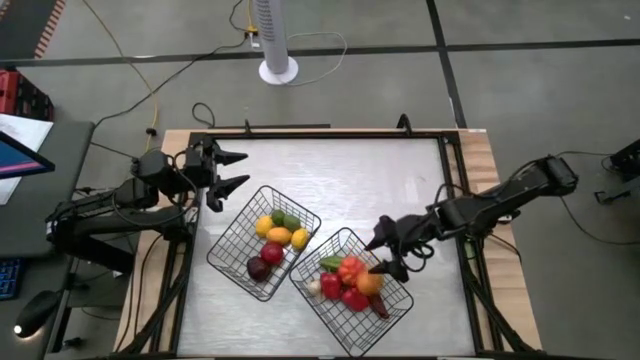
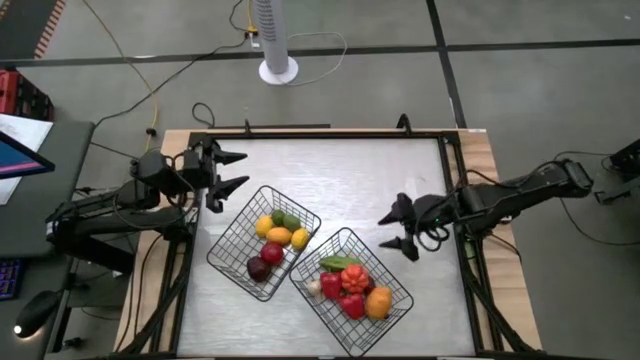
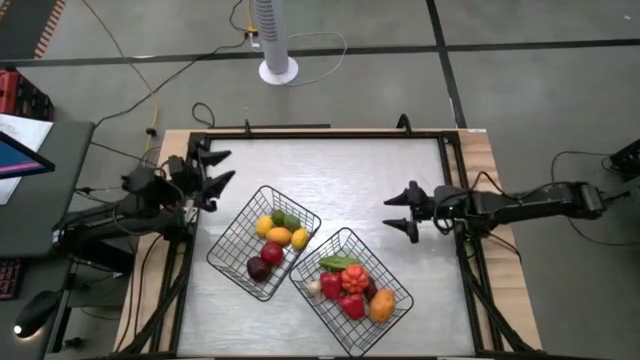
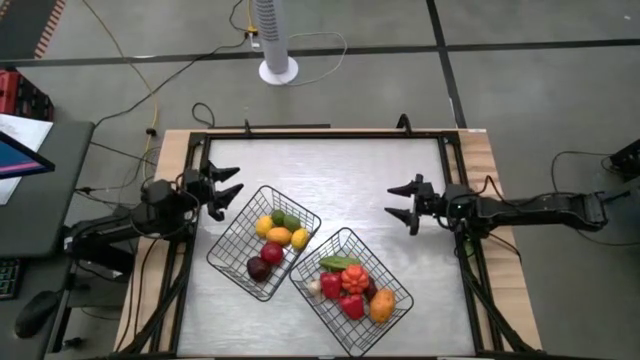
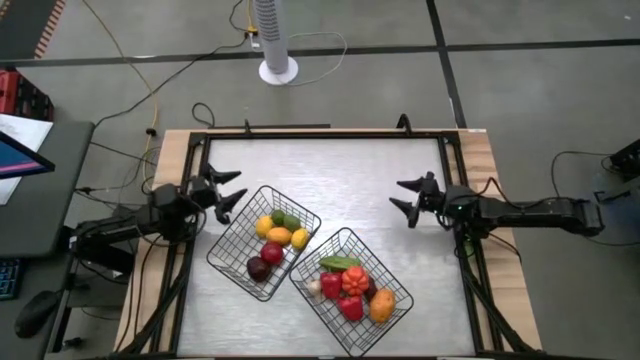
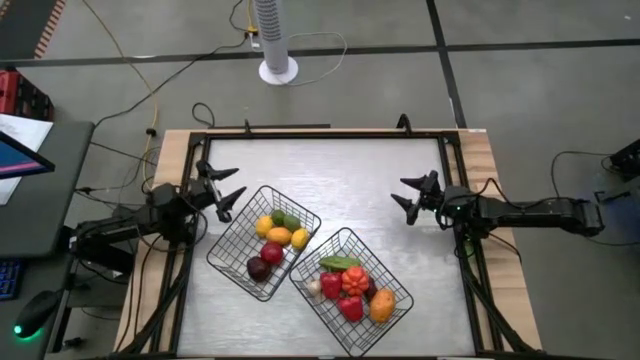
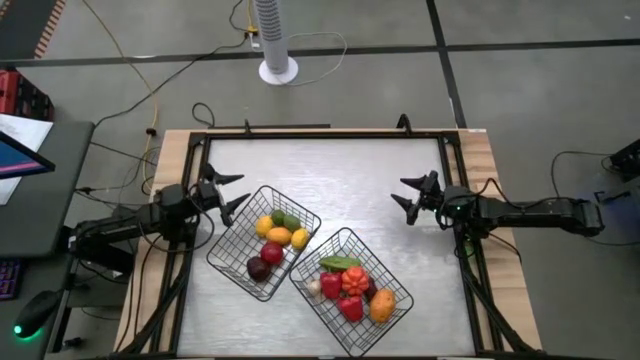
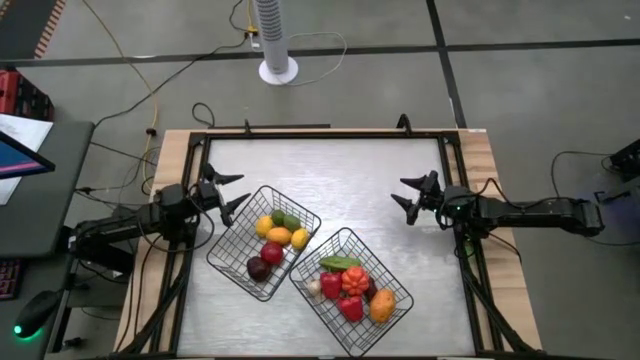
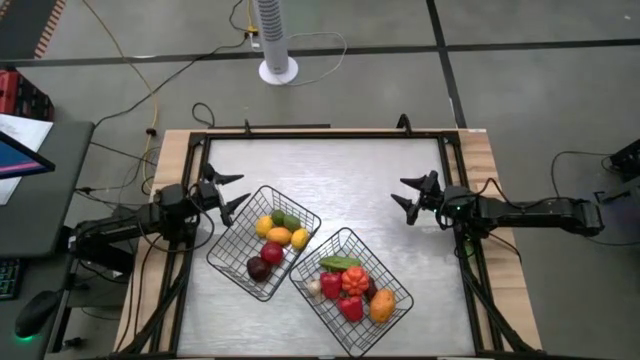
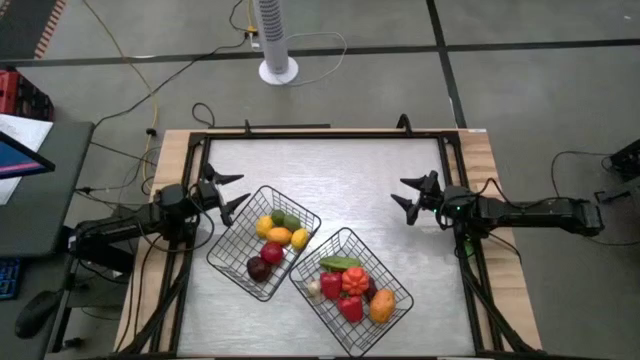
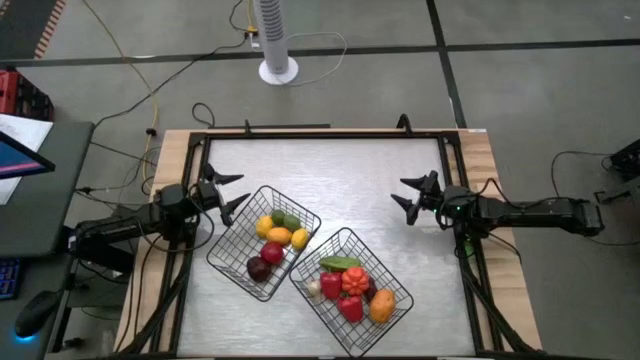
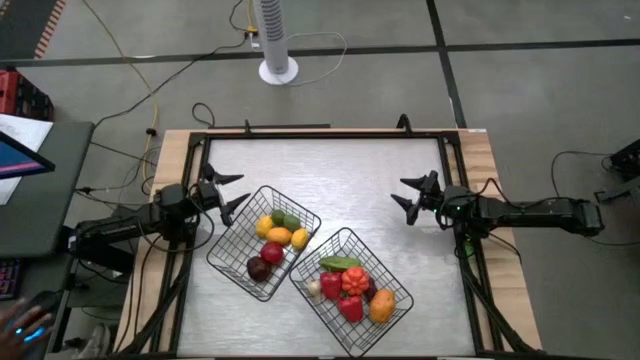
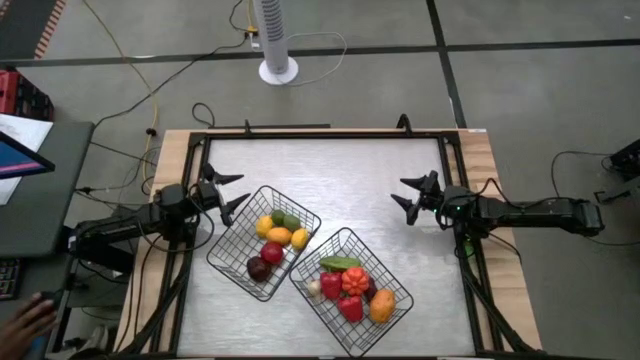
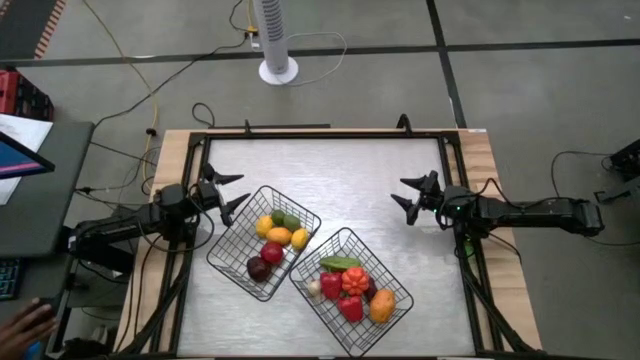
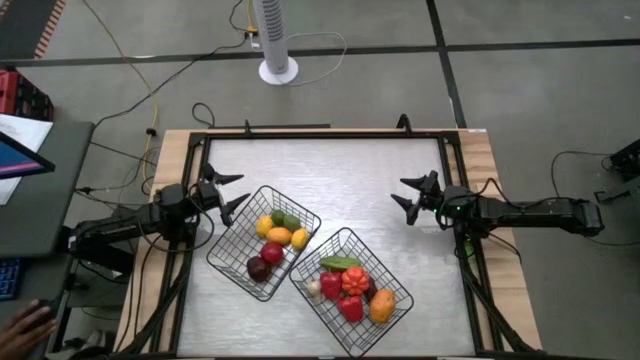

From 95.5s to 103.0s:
Task: Sort produce into baskets
Return to Home Position

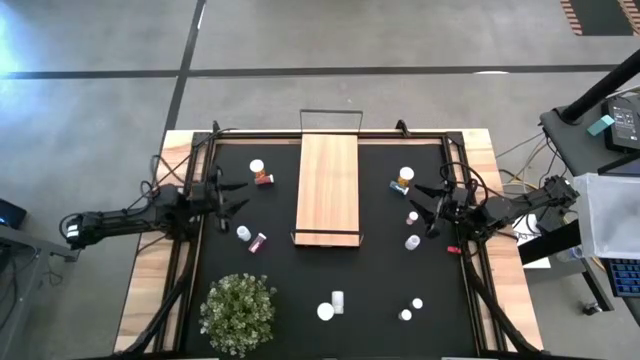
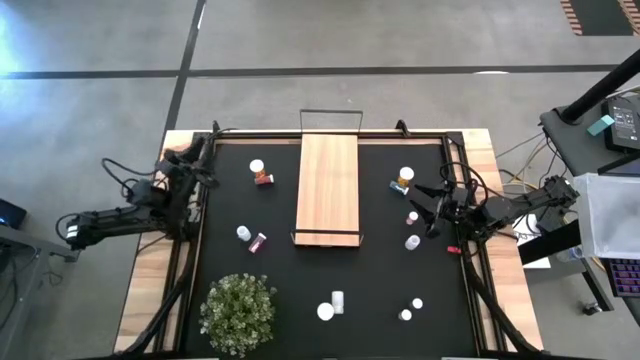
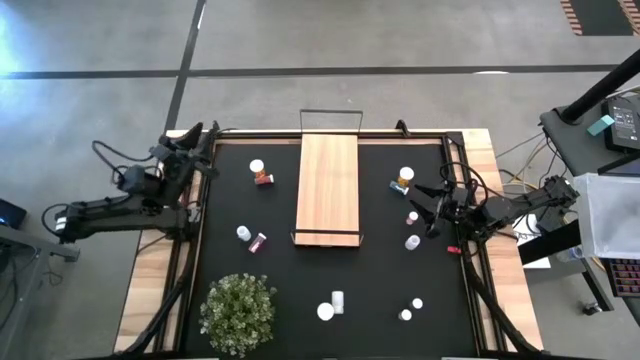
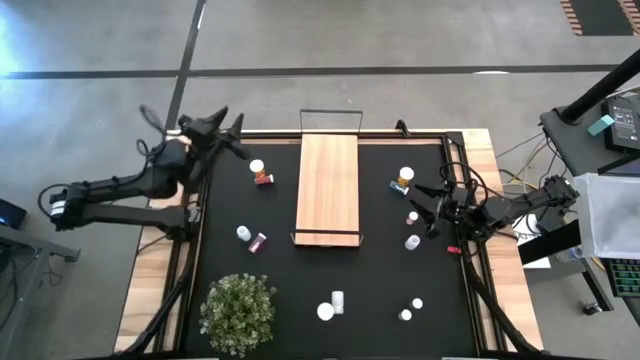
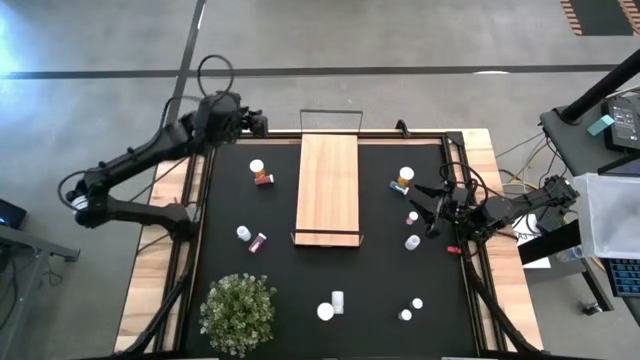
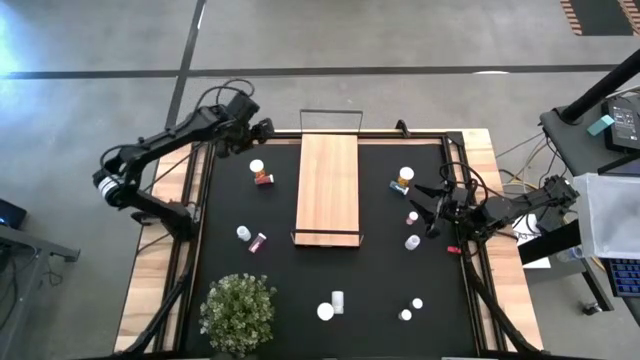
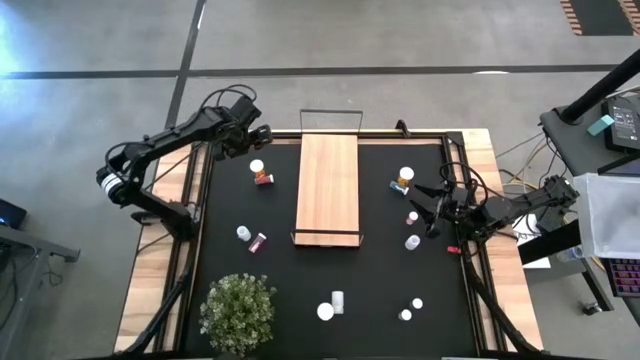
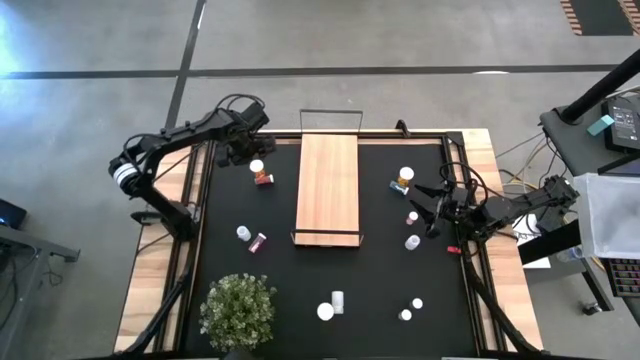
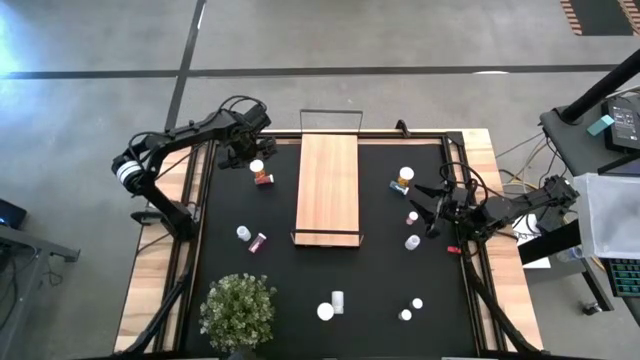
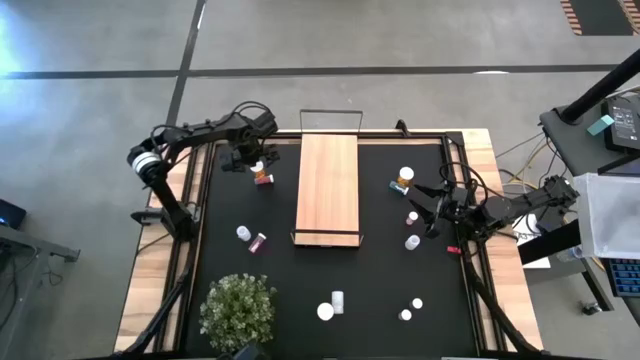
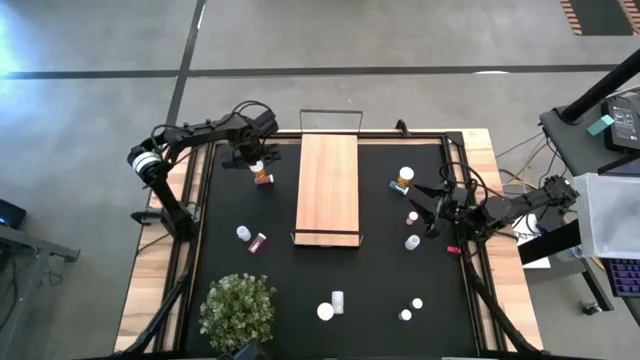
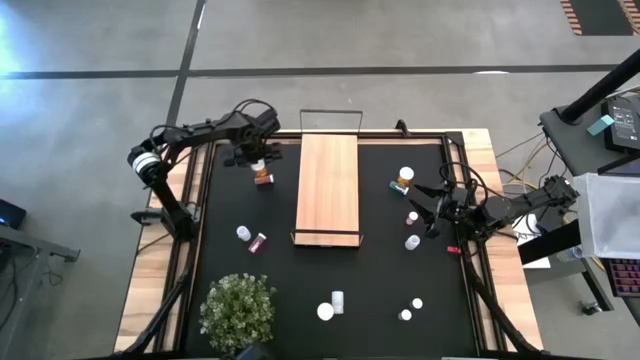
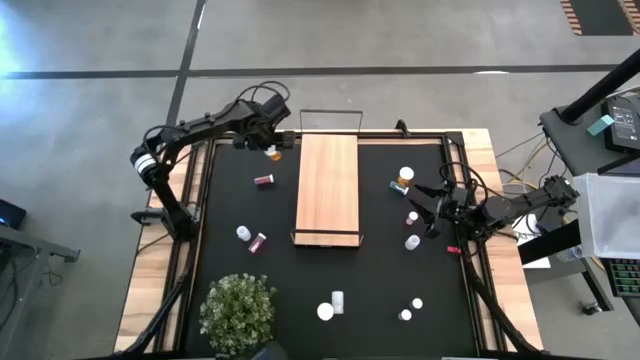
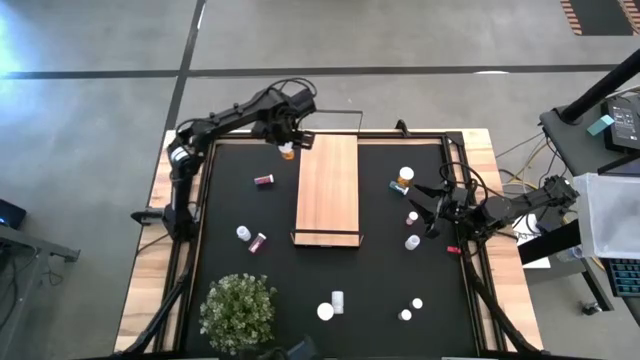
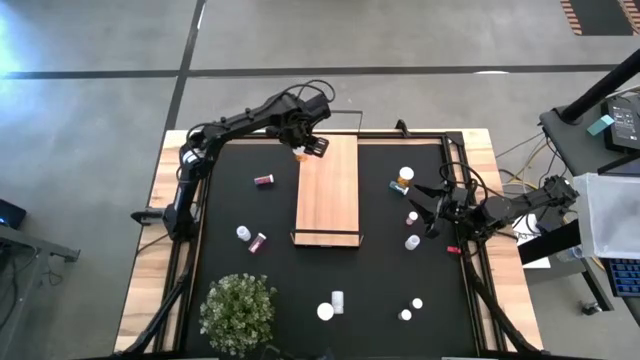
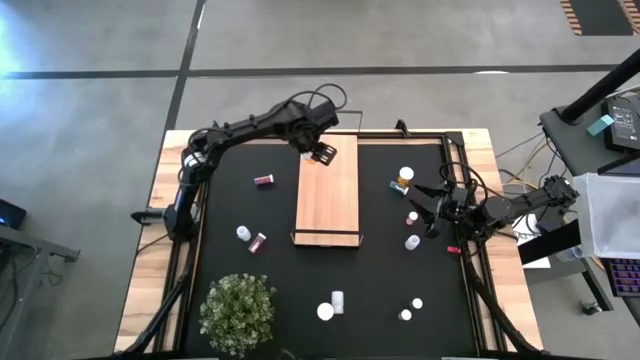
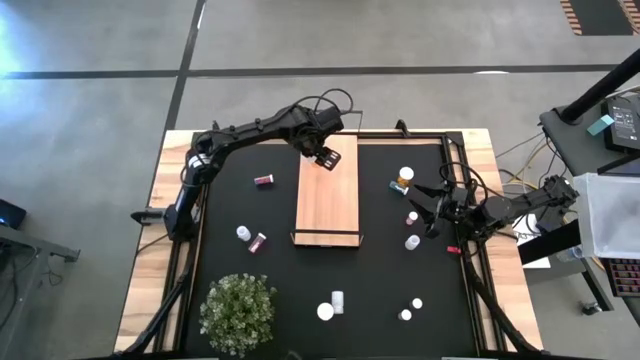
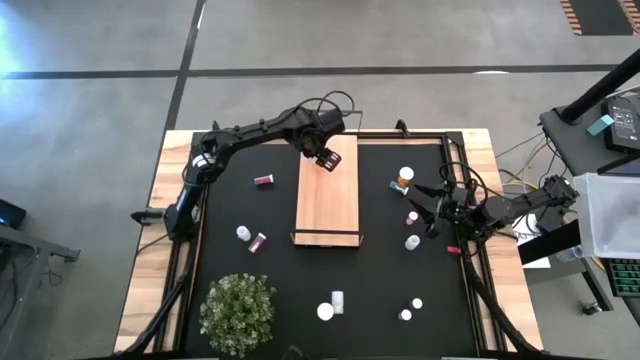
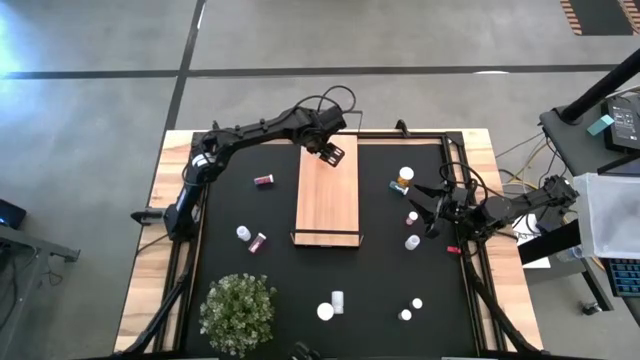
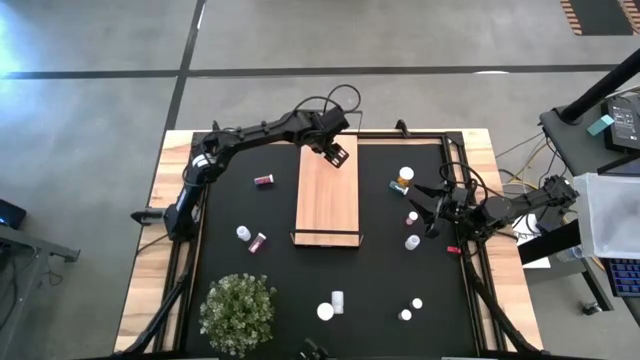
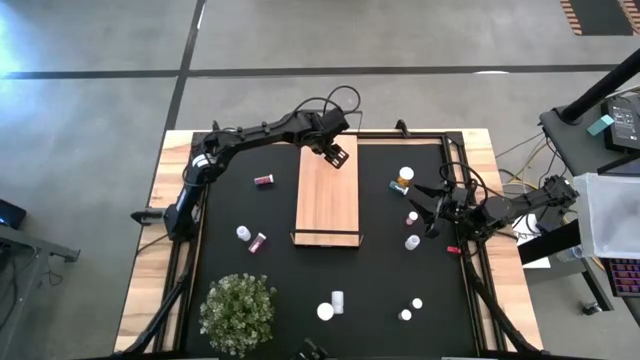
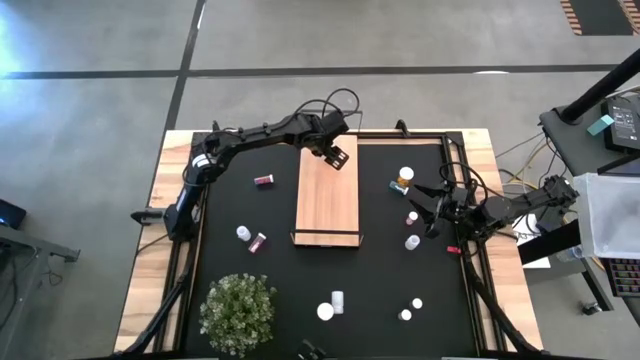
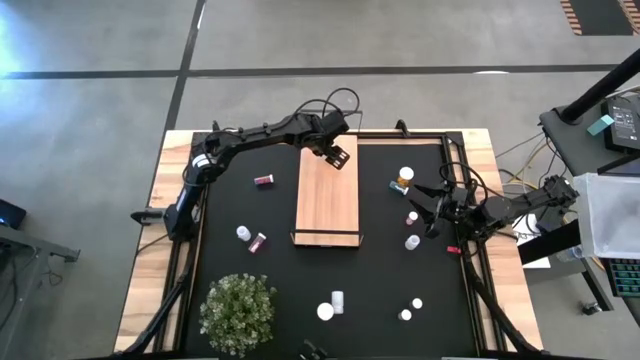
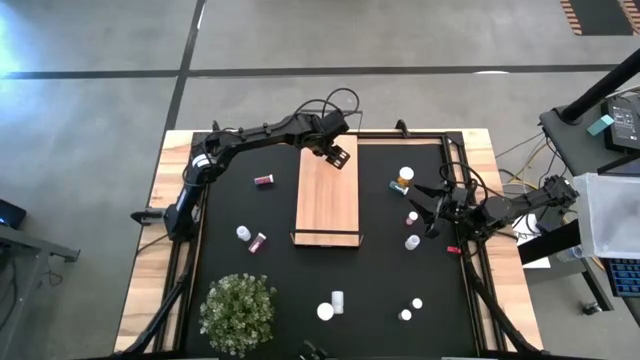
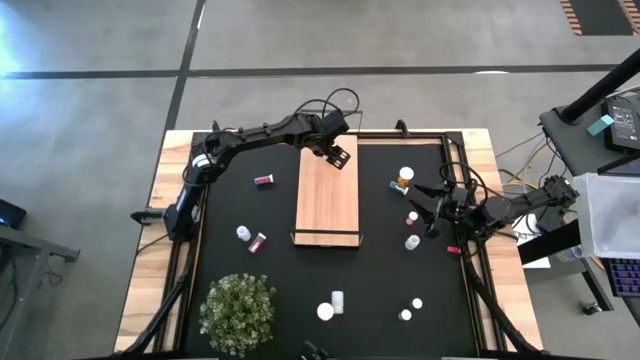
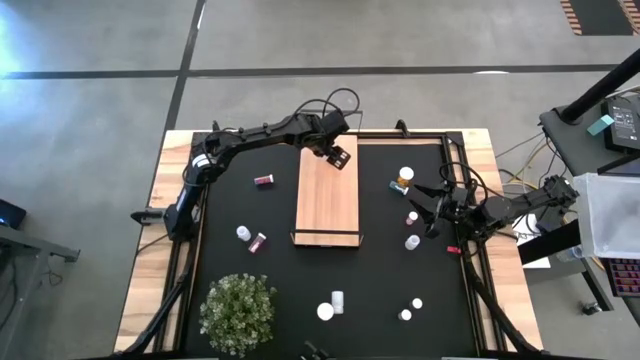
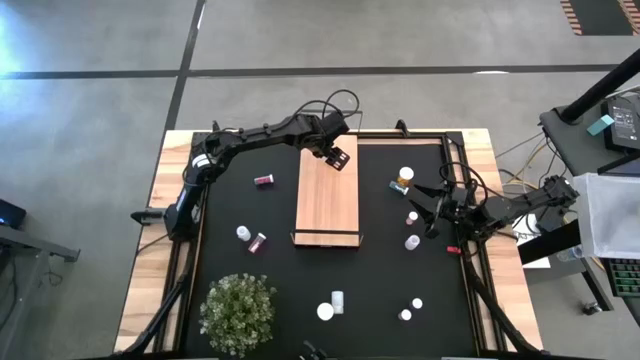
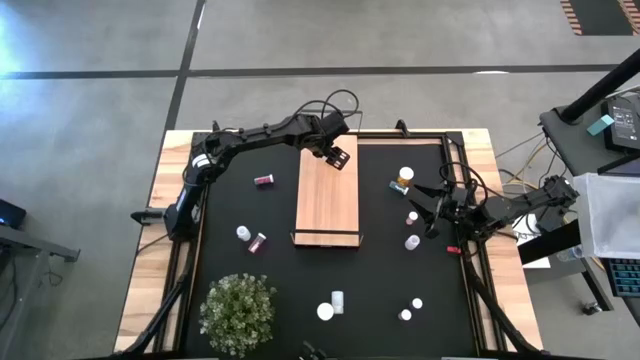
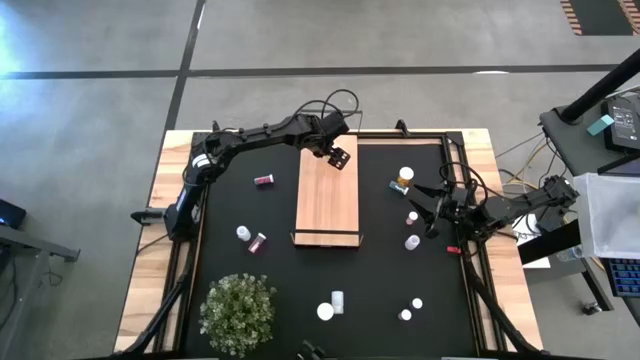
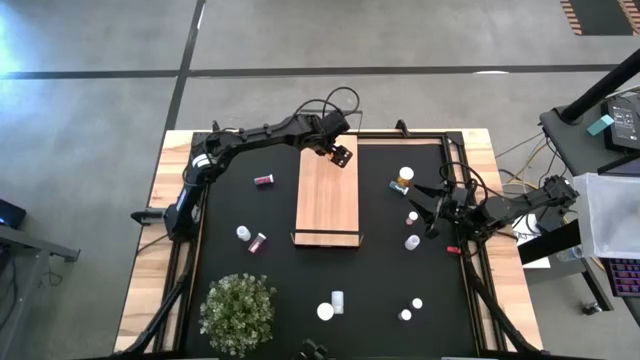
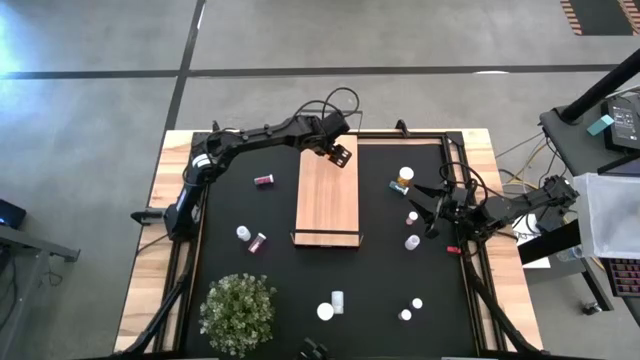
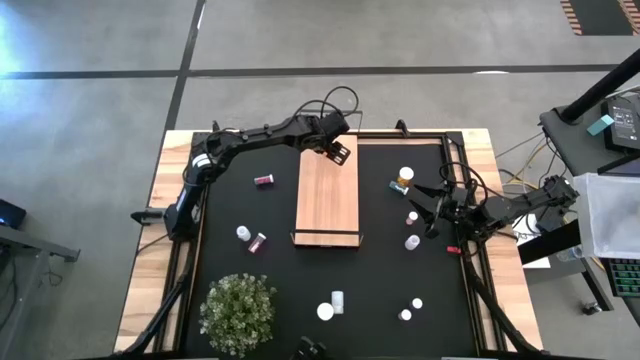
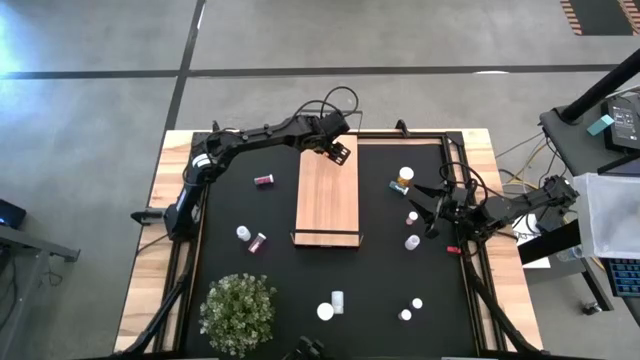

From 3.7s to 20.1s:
Task: Pick and place medicine bottles onto shelf by color
Put the top left orange pill bottle on the shelf
